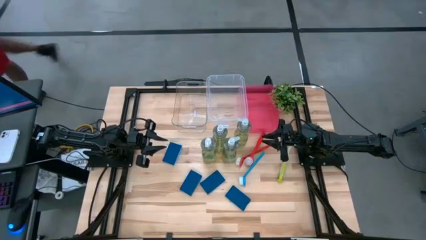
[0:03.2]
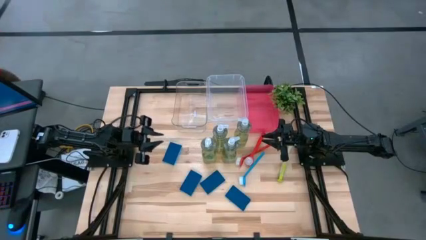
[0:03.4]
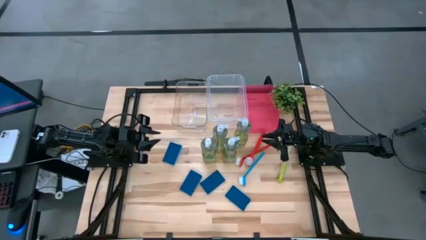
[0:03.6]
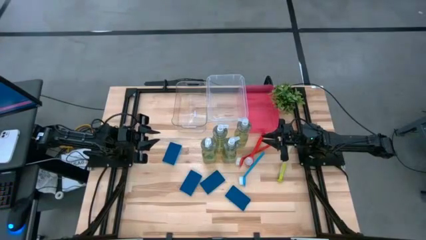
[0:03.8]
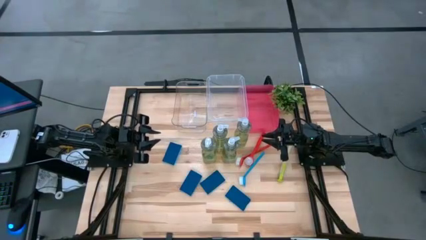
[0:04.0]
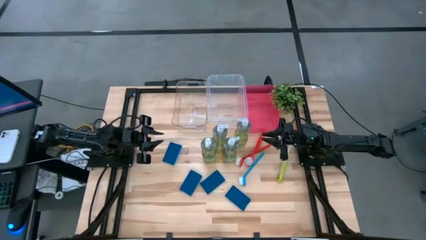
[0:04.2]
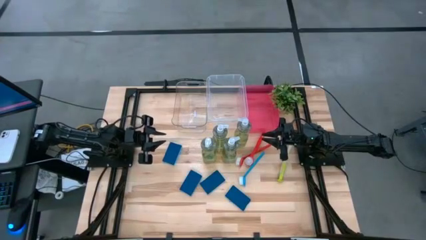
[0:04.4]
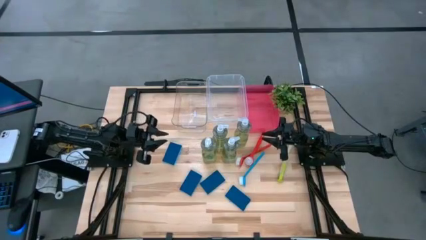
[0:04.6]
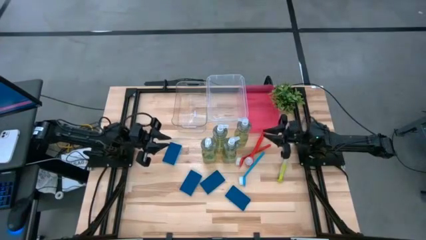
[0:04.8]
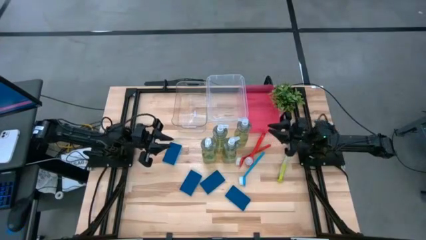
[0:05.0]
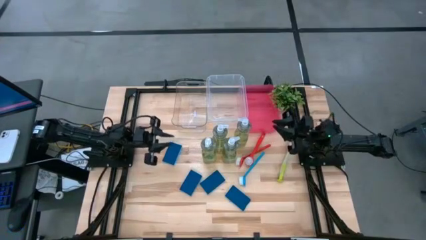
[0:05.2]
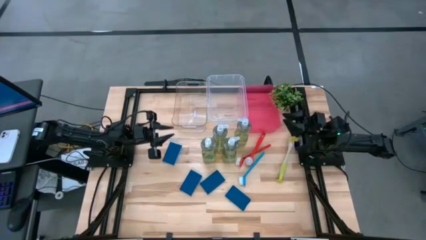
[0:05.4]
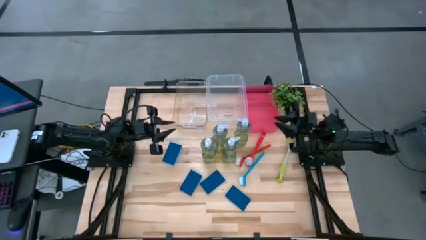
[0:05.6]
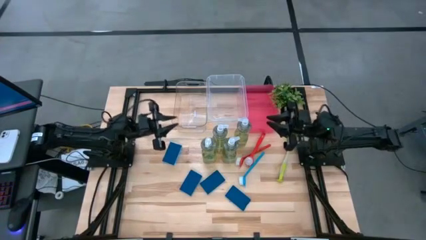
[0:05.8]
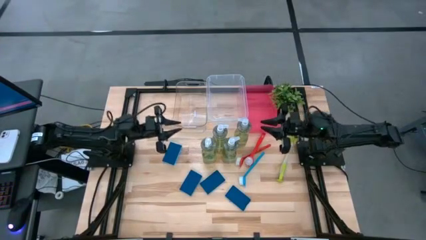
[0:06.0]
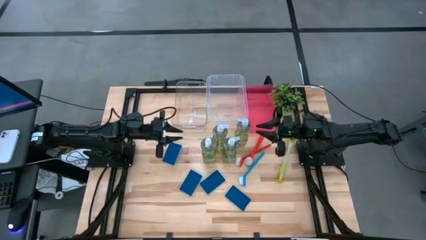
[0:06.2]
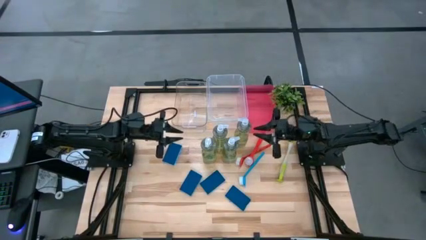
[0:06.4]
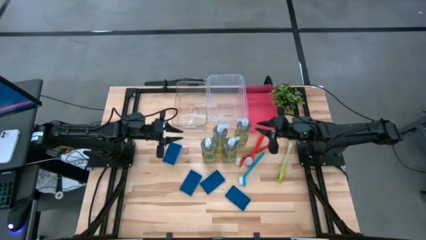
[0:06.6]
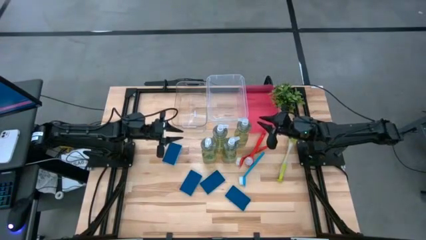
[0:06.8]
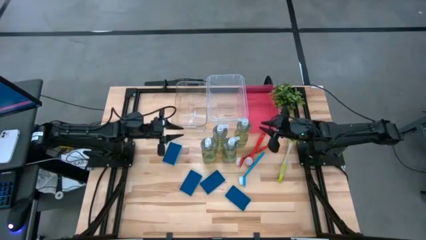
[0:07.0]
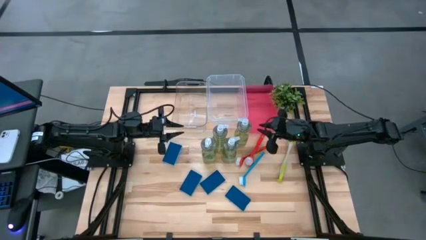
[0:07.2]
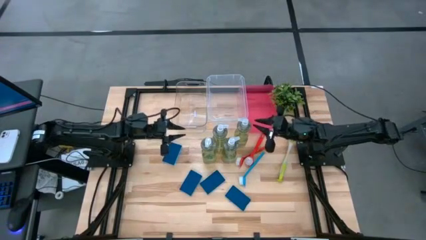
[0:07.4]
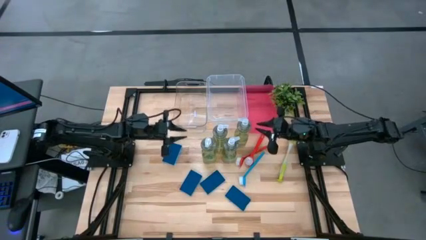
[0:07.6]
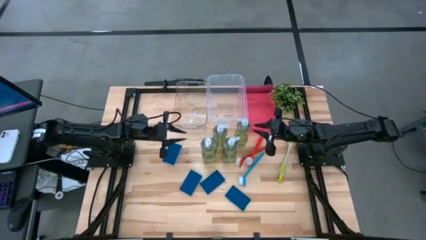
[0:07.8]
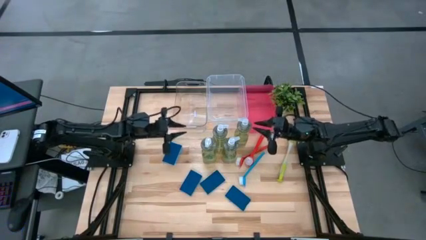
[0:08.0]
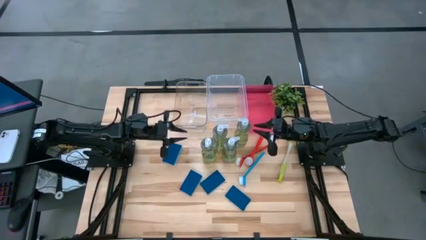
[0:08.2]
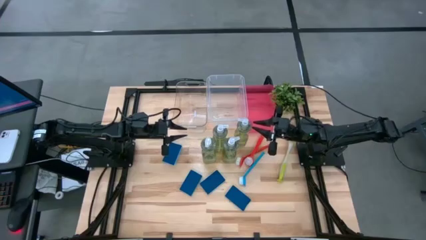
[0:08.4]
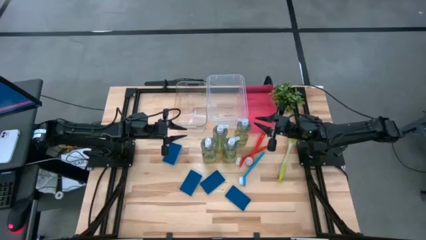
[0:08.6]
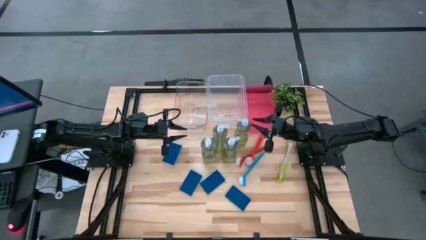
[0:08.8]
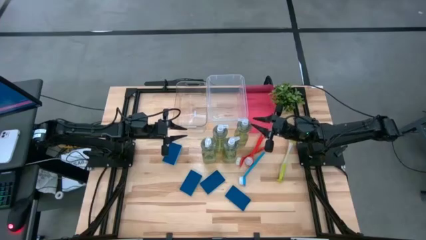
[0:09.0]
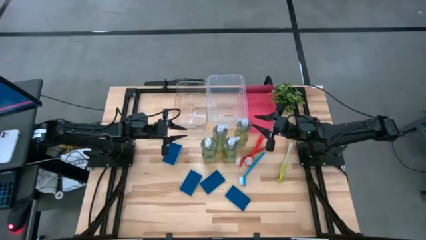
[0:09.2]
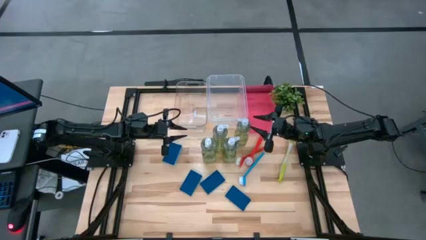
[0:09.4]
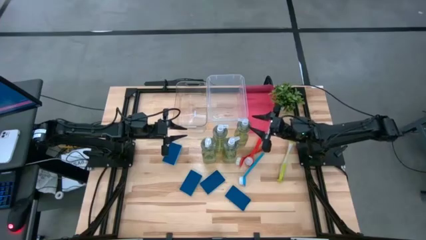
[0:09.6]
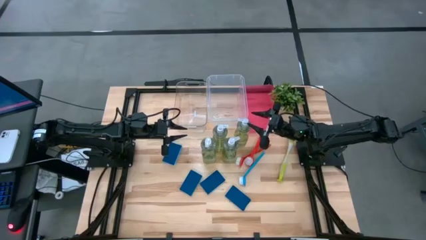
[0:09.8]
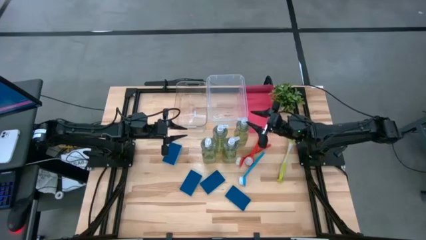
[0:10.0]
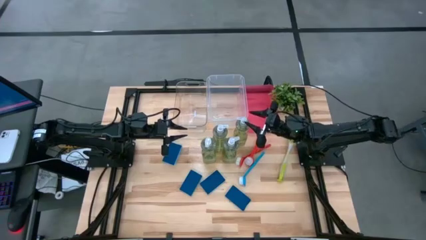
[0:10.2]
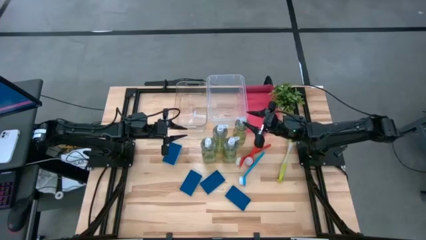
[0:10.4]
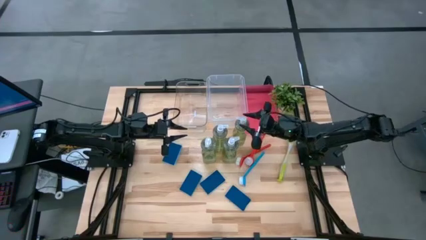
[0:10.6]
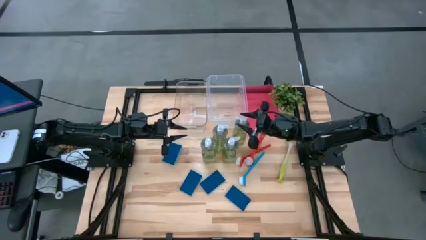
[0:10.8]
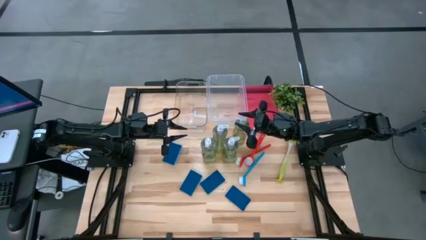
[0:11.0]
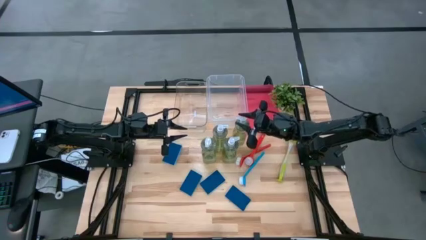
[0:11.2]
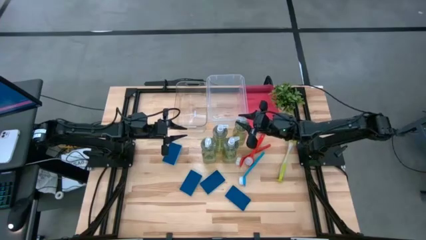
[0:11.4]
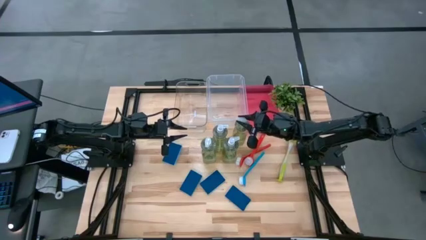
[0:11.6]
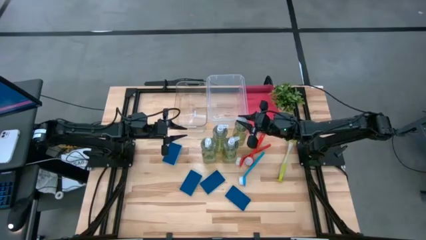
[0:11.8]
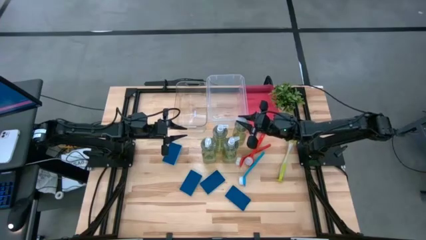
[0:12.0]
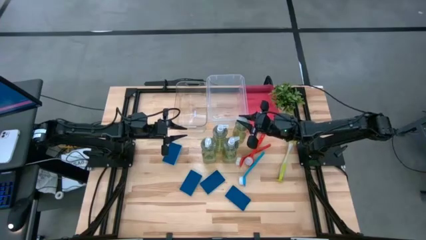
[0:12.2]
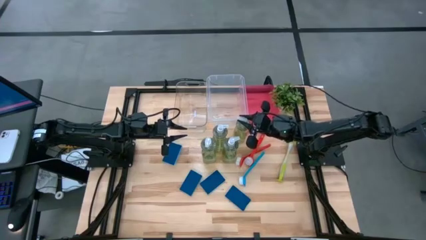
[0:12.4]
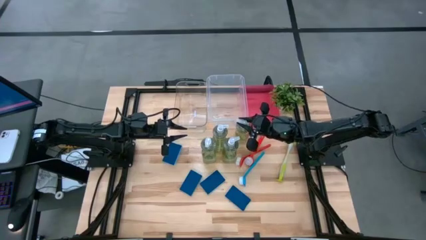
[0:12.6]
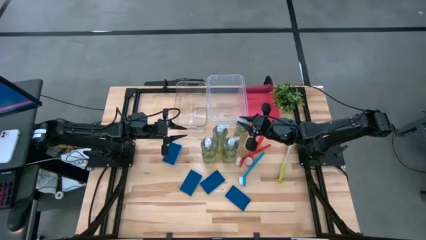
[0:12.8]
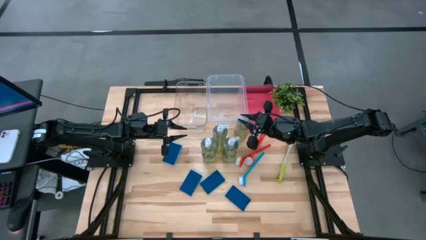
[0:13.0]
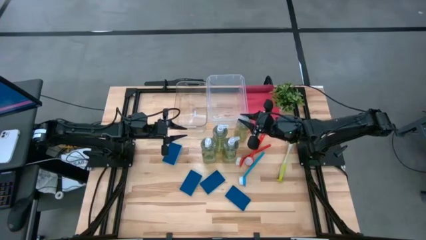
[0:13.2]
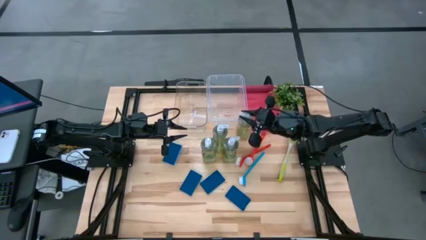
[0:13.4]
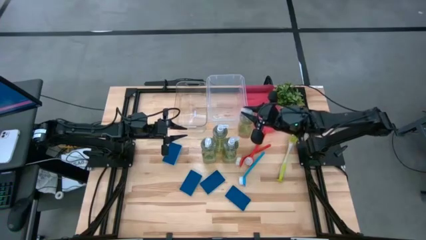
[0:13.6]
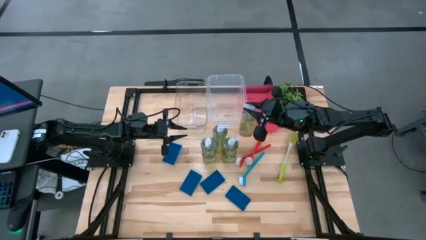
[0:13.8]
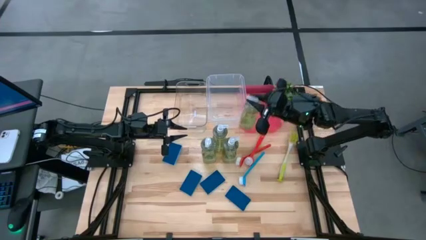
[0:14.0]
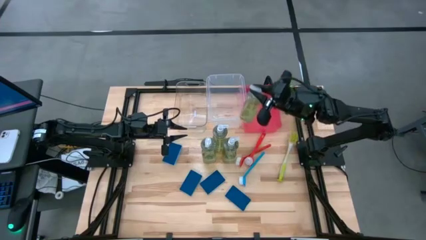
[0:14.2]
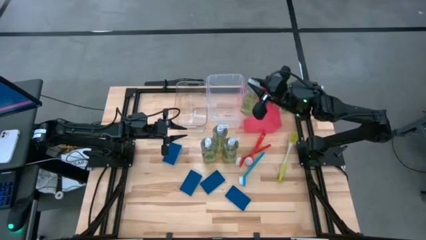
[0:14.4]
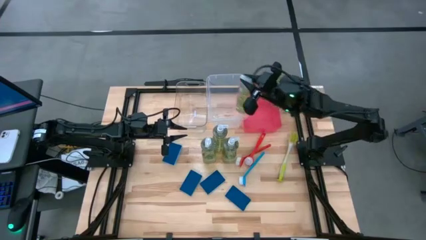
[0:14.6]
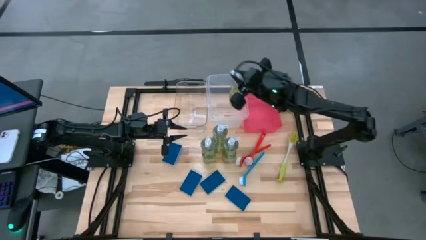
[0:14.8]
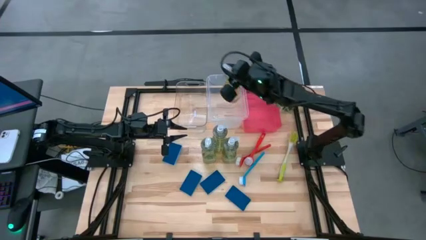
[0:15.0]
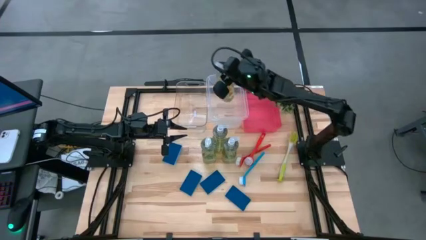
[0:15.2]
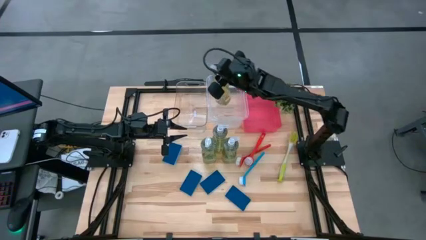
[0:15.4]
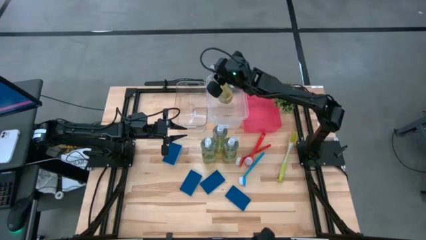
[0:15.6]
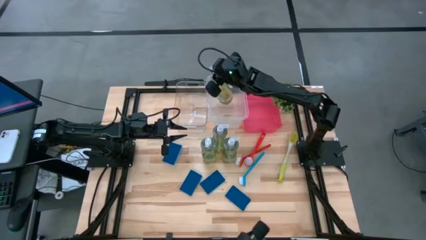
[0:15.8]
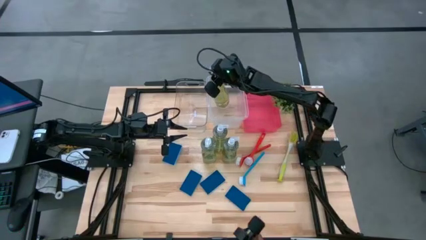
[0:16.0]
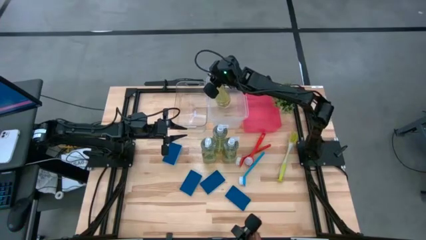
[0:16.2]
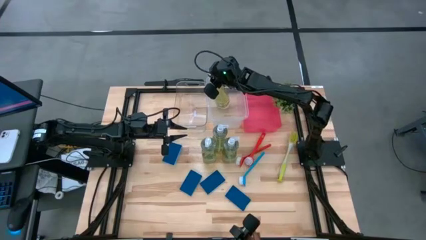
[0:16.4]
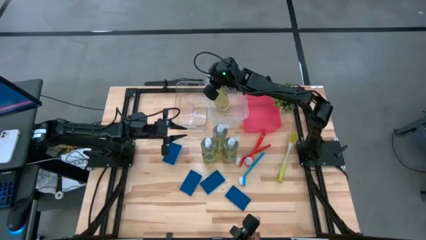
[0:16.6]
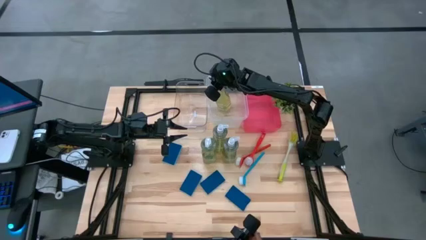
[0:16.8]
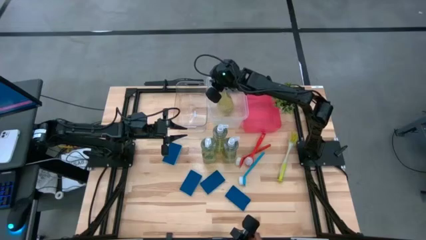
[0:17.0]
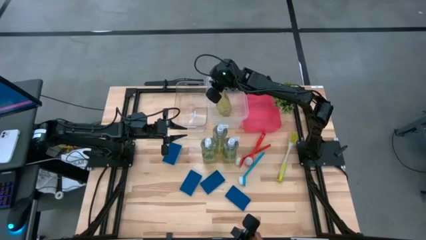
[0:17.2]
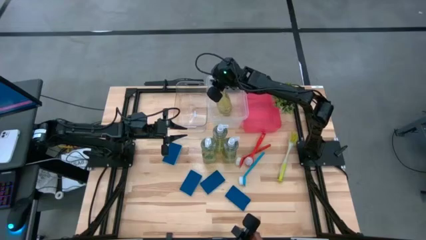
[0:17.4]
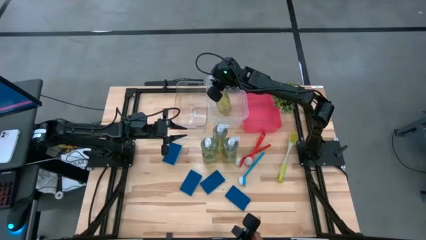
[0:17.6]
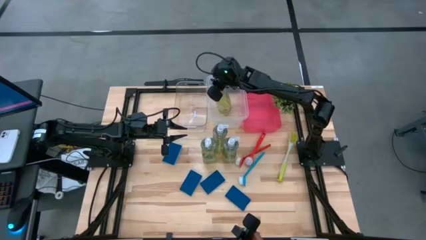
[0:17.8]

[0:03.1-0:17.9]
Task: Pick & Place Kitchen Sink Supplies
Put the transparent soap dispenser into the right transparent bin
